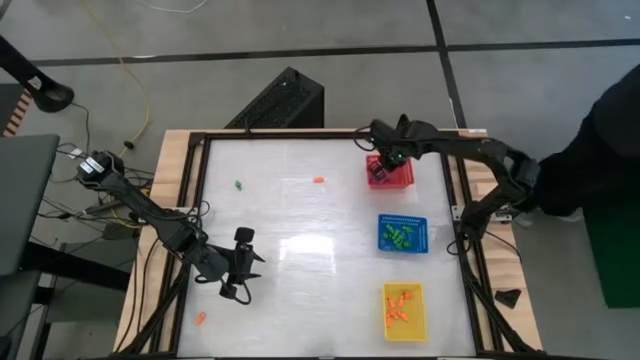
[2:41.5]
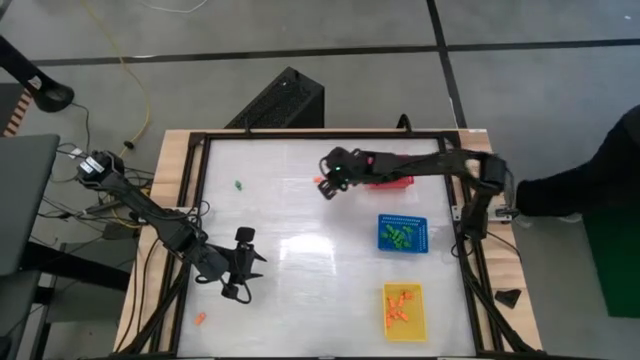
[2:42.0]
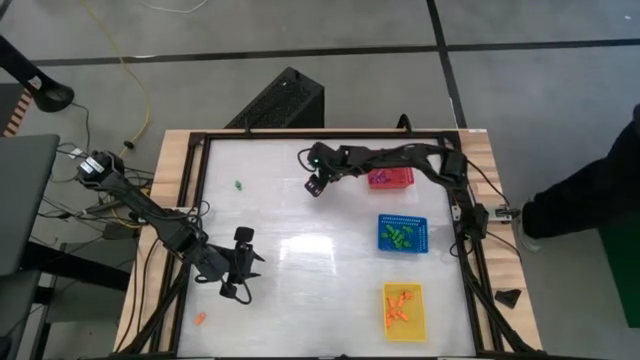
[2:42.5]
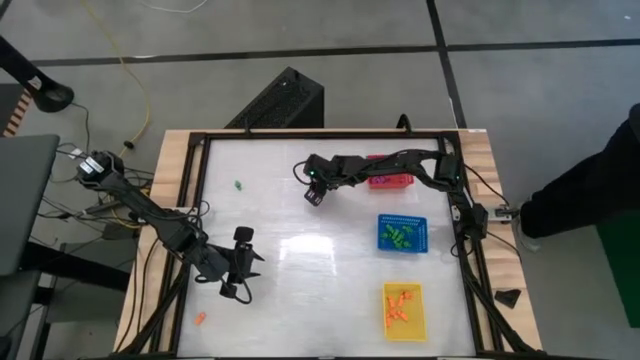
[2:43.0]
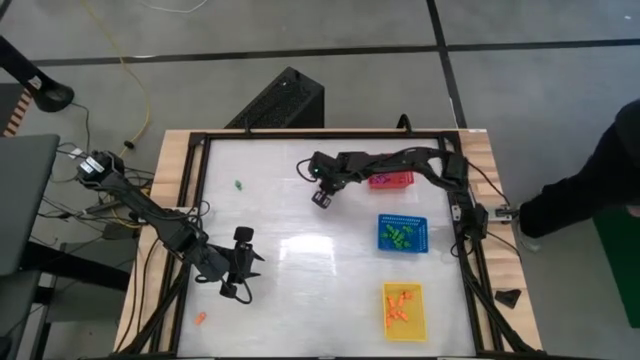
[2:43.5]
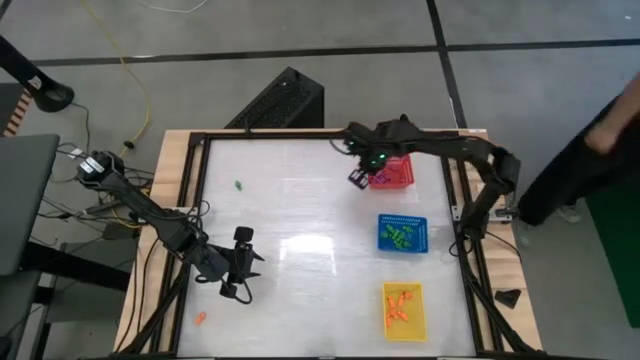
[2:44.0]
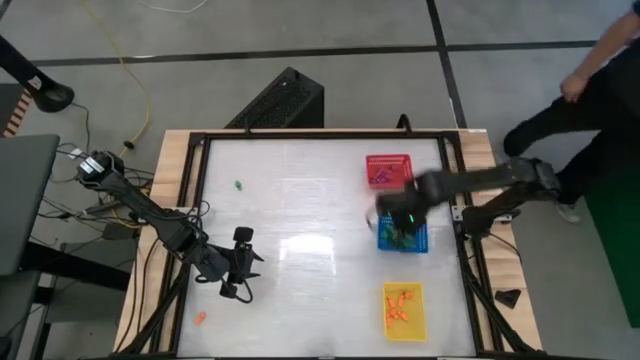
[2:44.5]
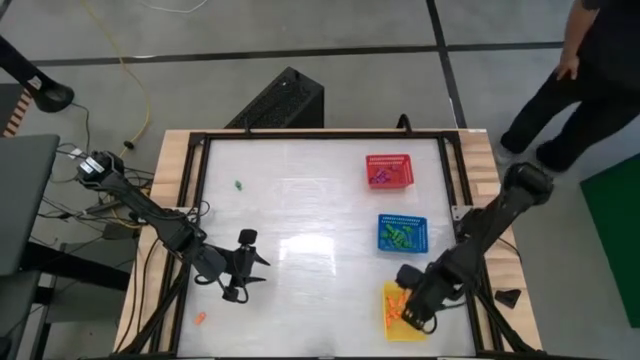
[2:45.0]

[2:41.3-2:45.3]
Task: Sort Halloween decoration
Put the orange skeleton toy into the yellow basket

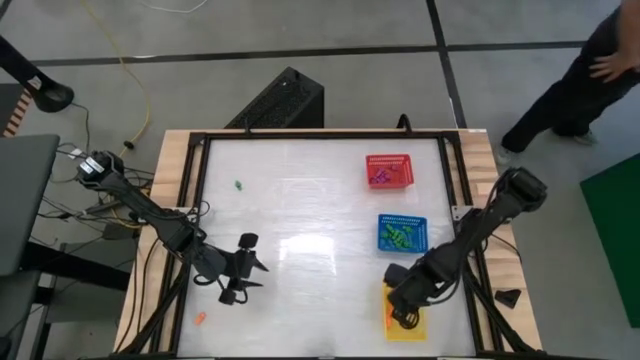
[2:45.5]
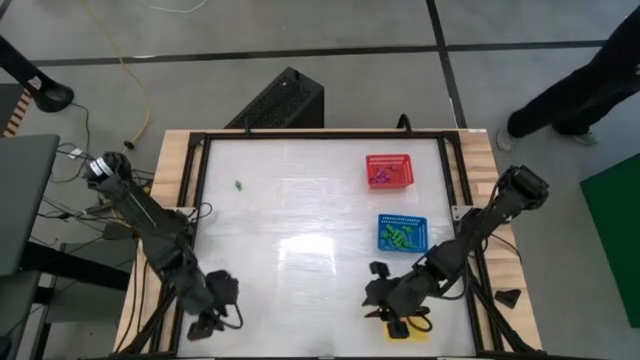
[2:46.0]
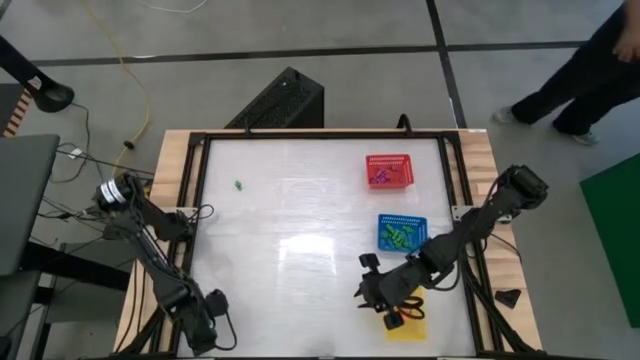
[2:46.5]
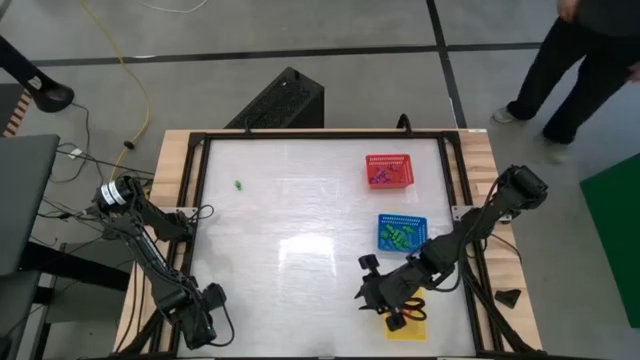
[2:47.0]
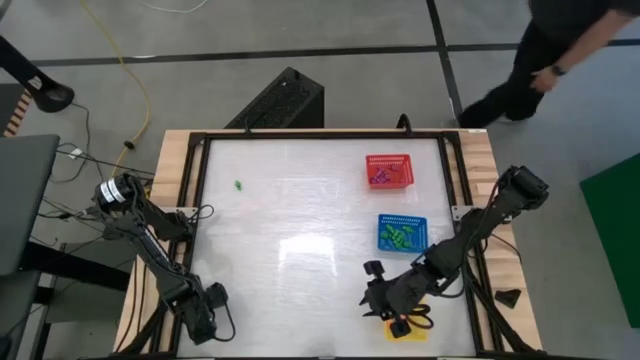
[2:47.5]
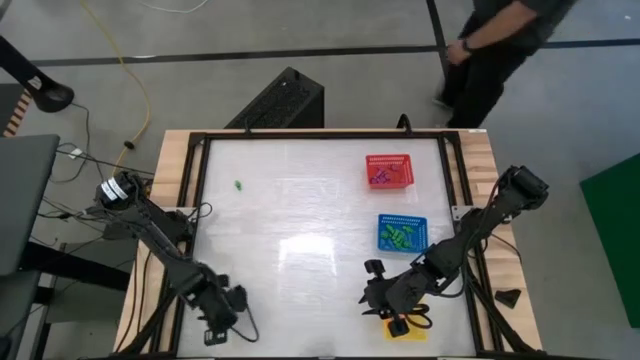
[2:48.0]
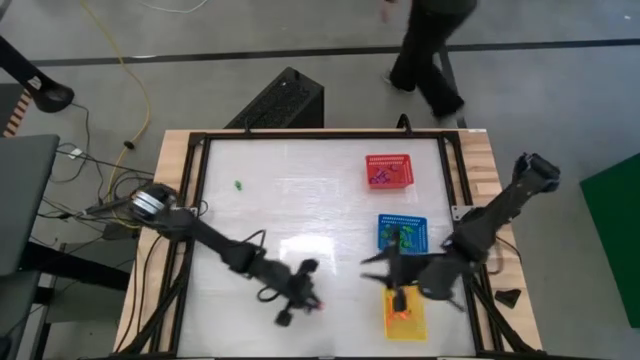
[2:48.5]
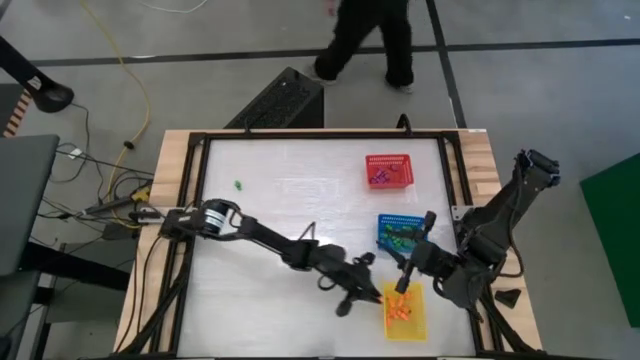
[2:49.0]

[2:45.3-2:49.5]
Put the orange skeleton toy into the yellow basket

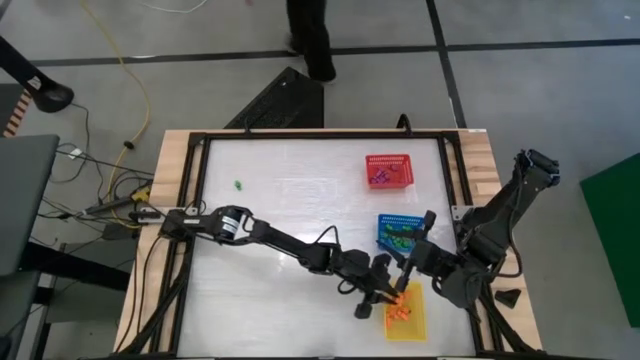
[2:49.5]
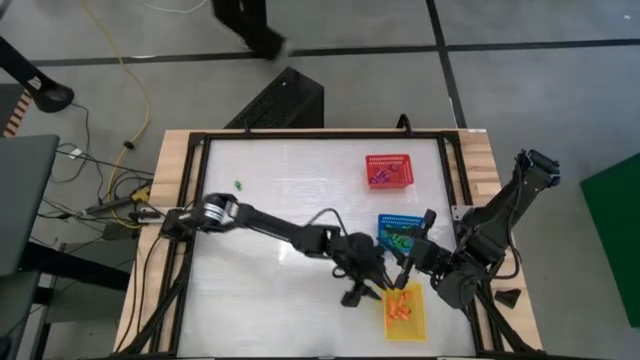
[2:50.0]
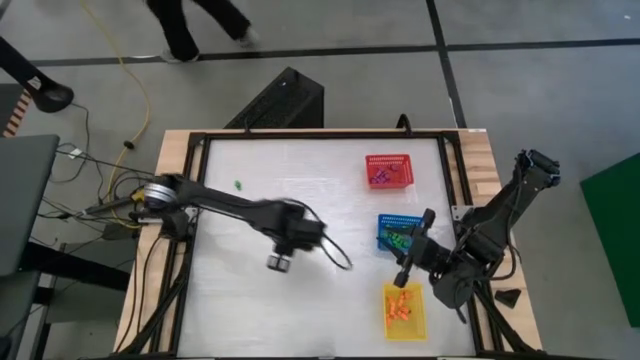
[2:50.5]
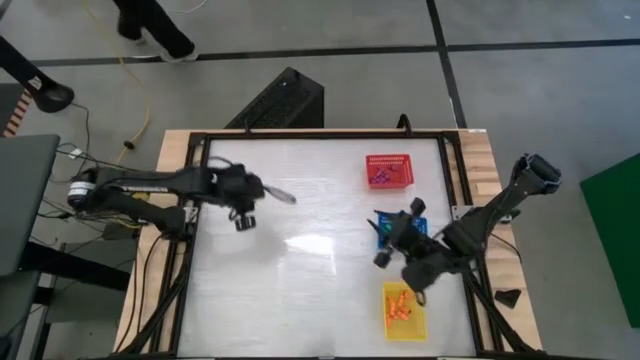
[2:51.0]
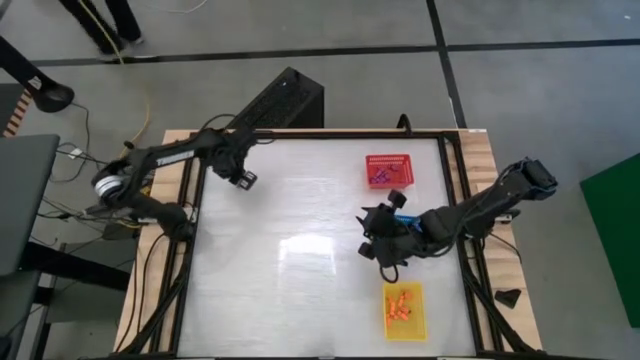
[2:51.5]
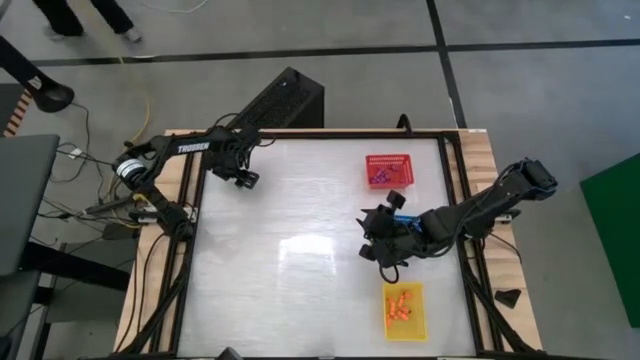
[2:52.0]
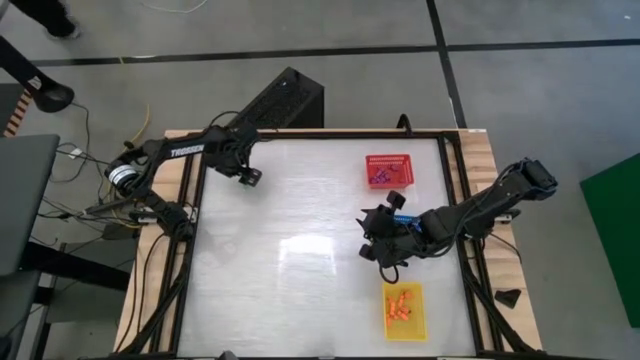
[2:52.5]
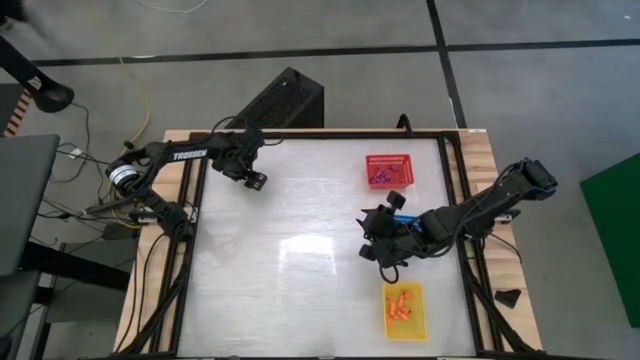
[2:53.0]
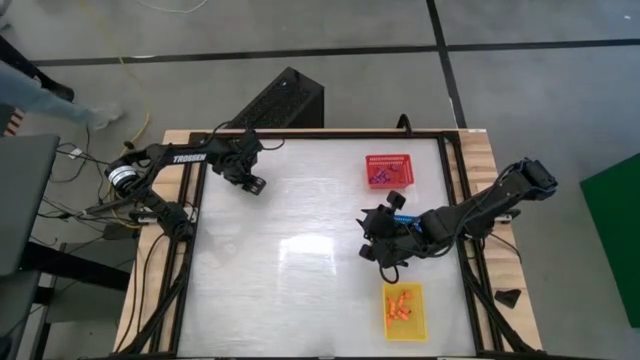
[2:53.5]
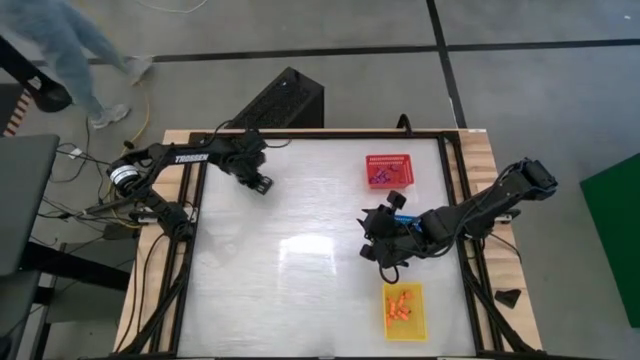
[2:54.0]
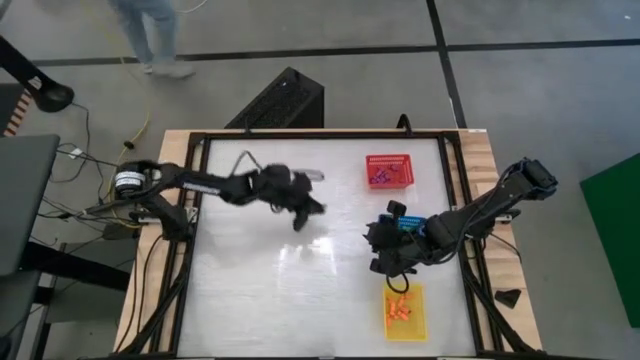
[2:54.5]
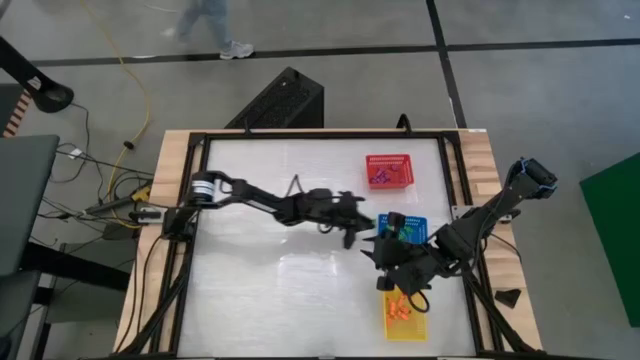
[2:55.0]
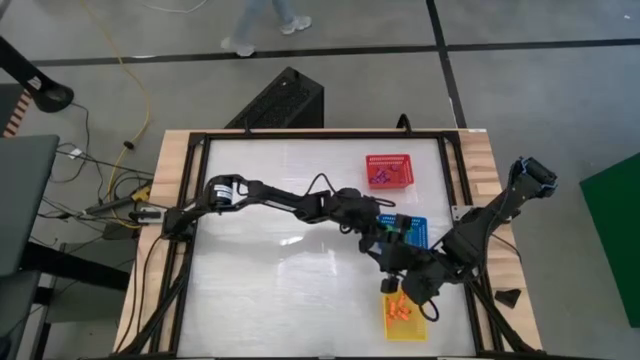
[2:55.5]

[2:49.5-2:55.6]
Put the green skeleton toy into the blue basket

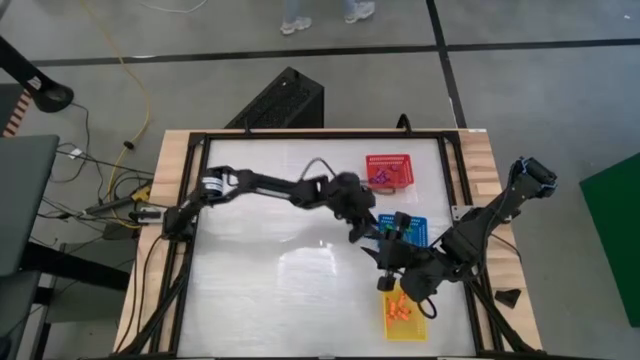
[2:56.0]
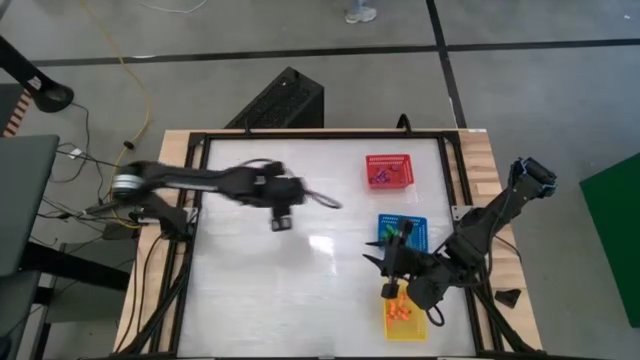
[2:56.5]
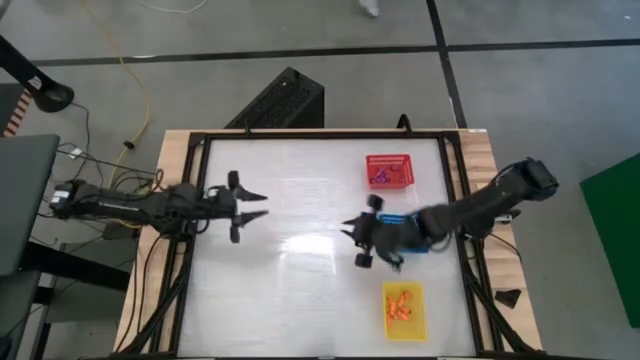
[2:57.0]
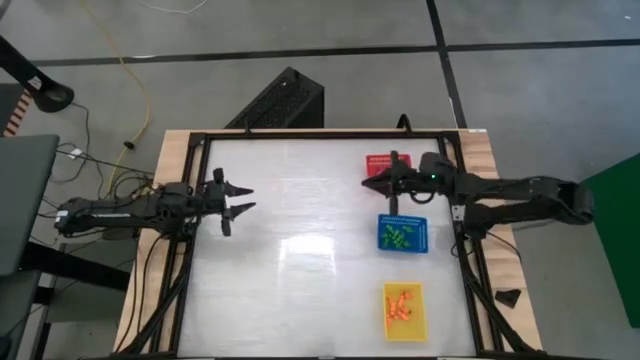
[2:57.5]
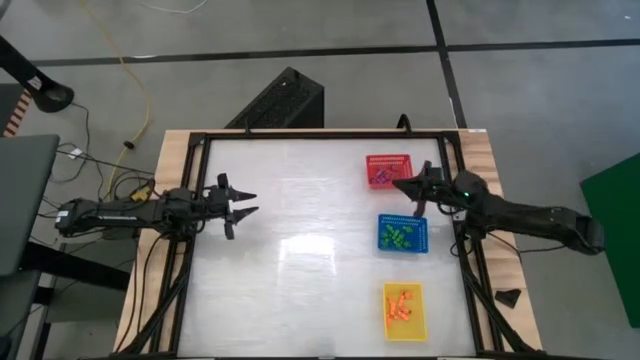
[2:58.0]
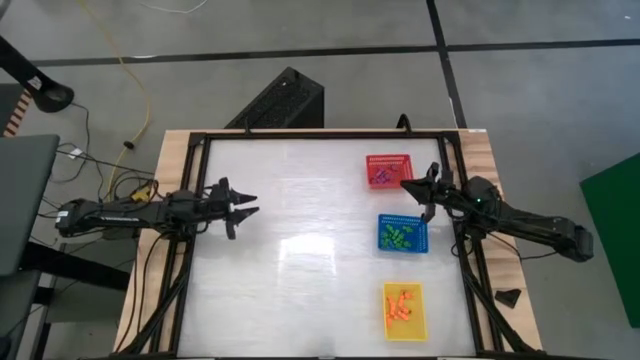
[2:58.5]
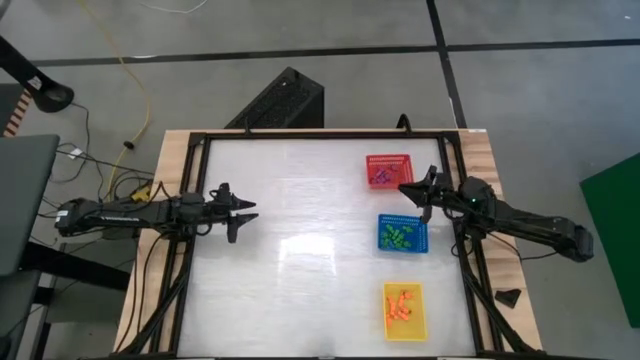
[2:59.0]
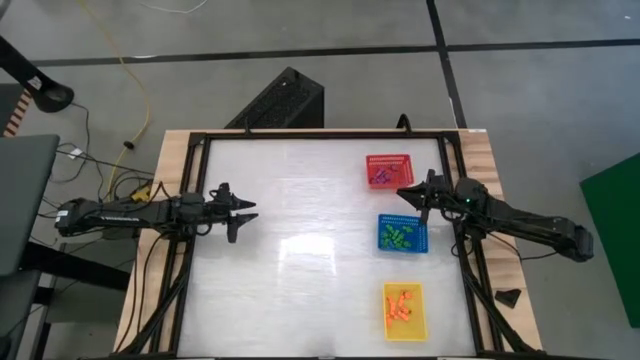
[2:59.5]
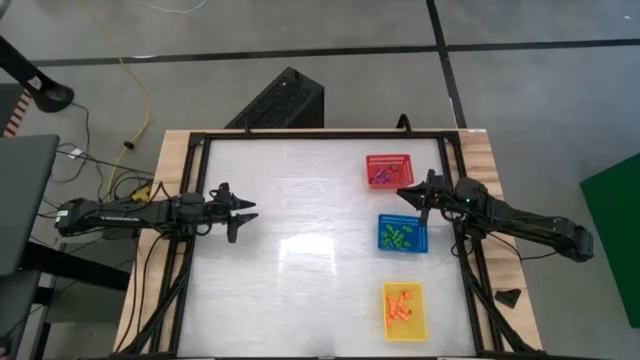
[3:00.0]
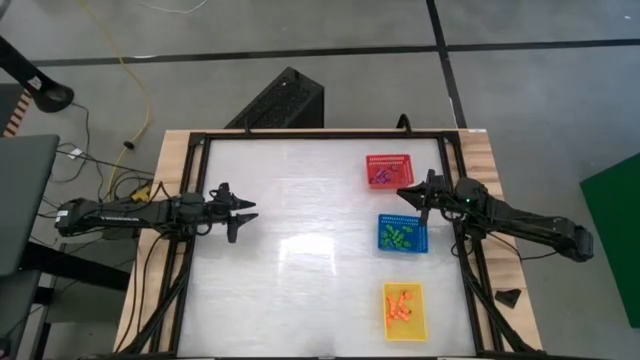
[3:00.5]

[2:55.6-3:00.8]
Return to Home Position
